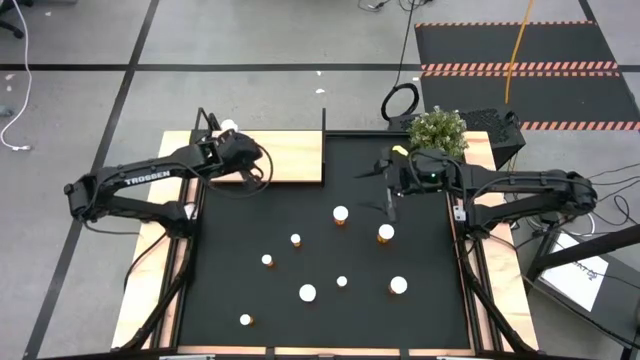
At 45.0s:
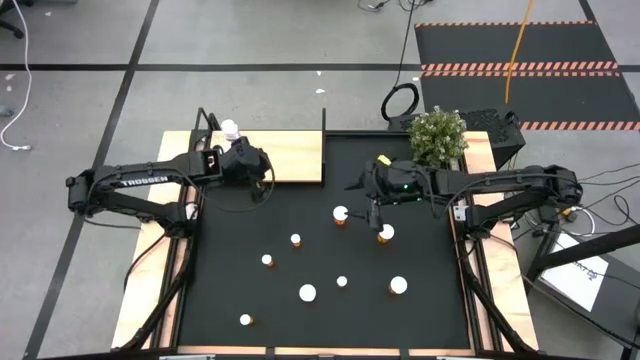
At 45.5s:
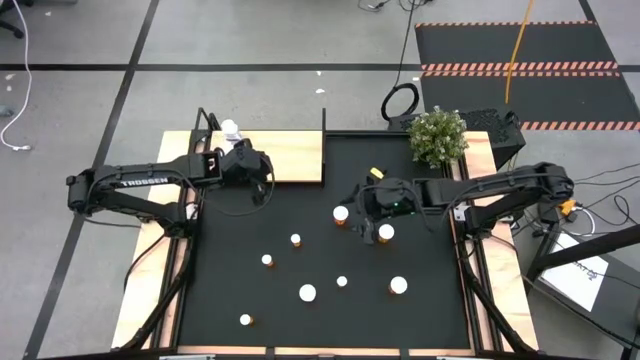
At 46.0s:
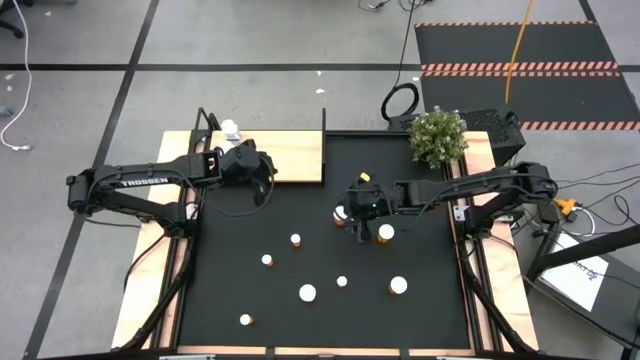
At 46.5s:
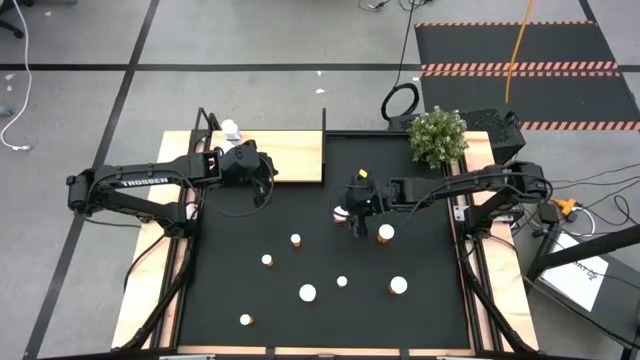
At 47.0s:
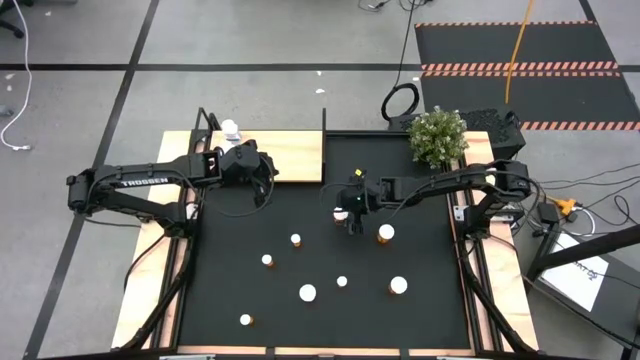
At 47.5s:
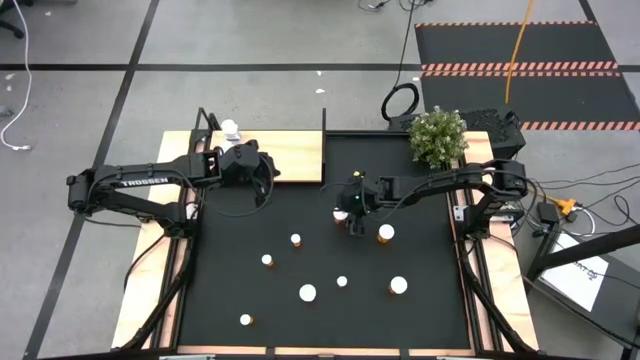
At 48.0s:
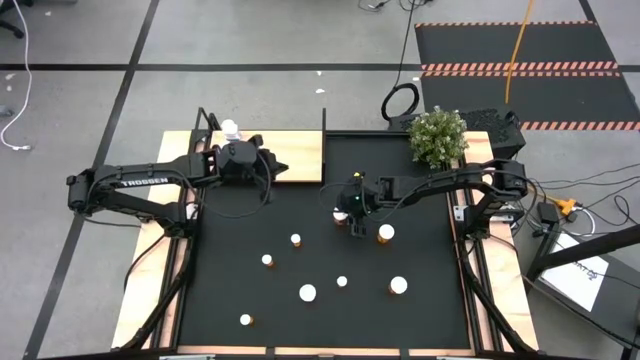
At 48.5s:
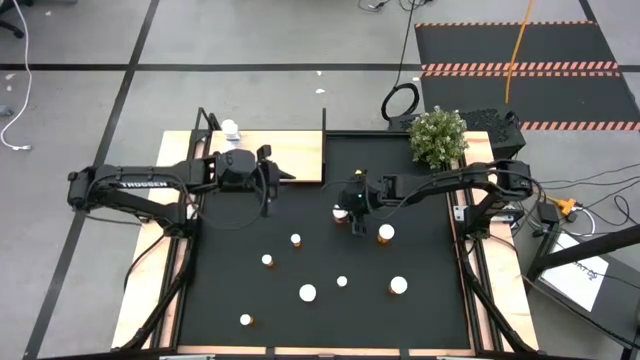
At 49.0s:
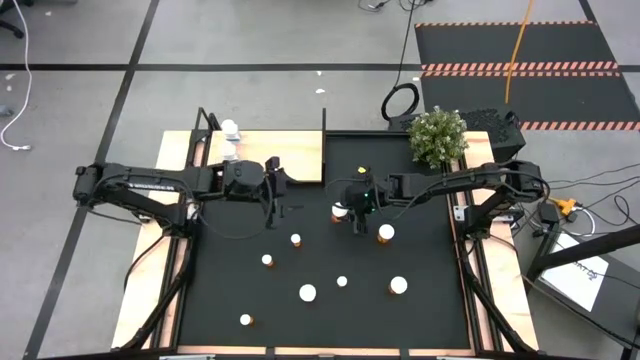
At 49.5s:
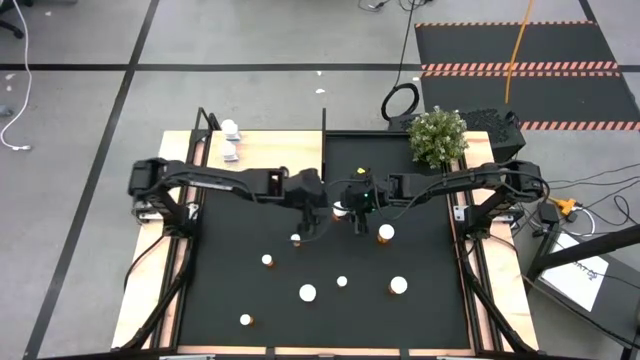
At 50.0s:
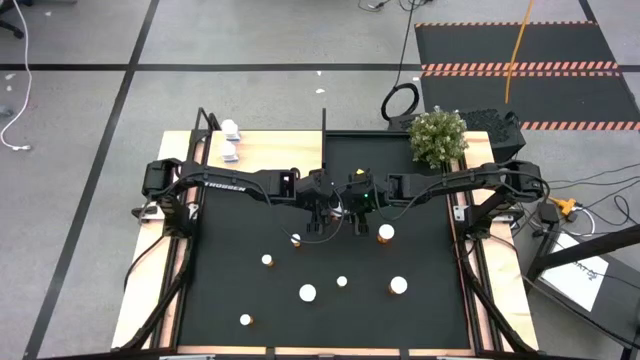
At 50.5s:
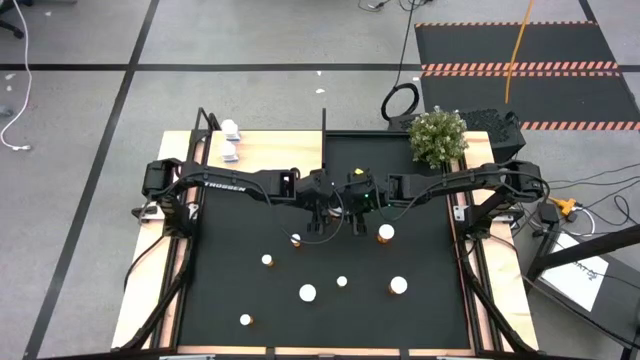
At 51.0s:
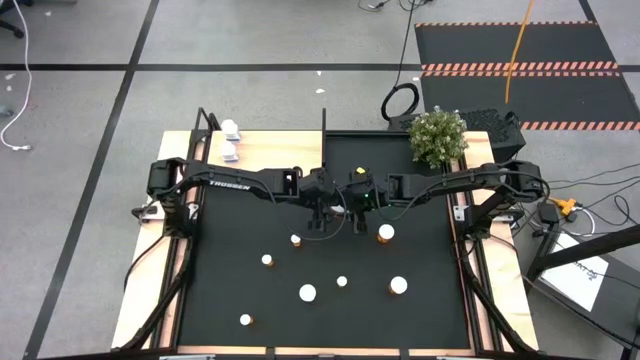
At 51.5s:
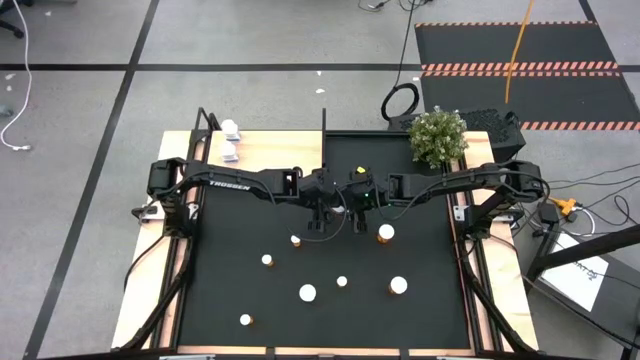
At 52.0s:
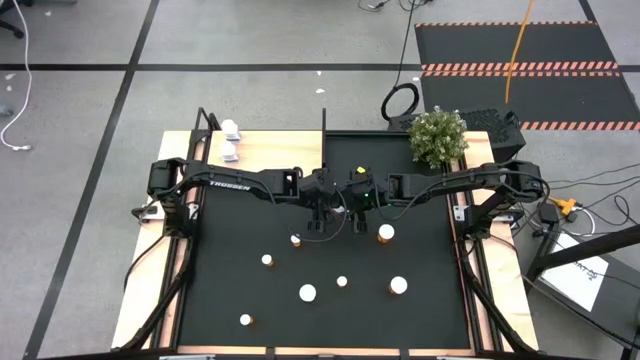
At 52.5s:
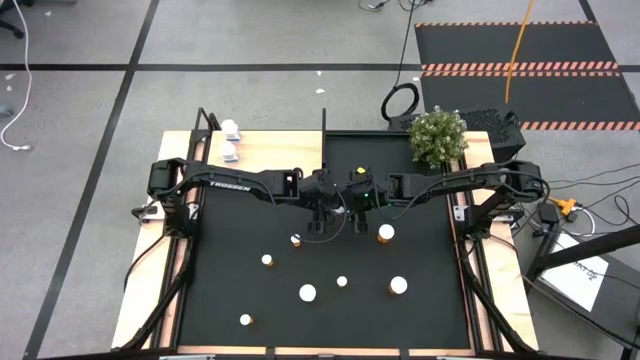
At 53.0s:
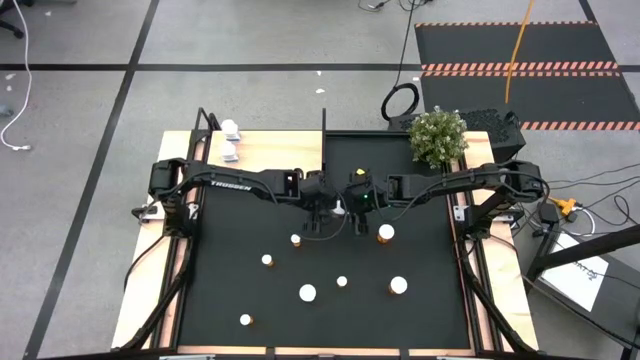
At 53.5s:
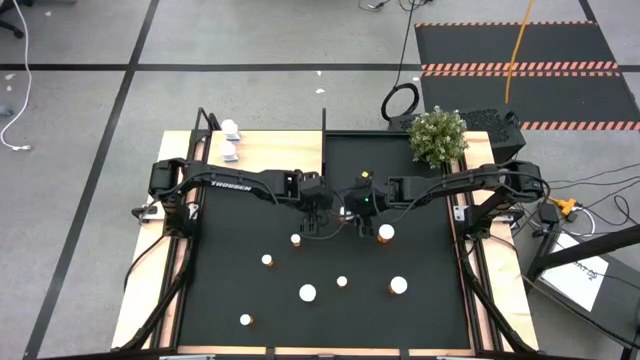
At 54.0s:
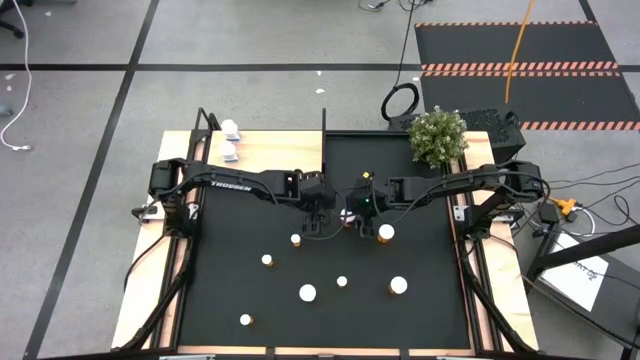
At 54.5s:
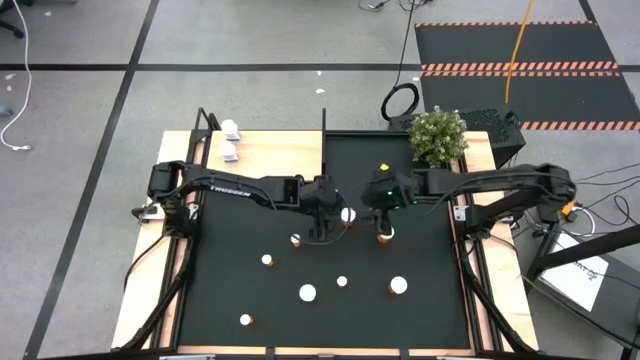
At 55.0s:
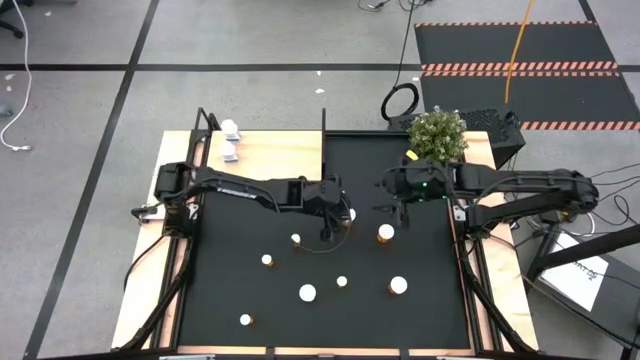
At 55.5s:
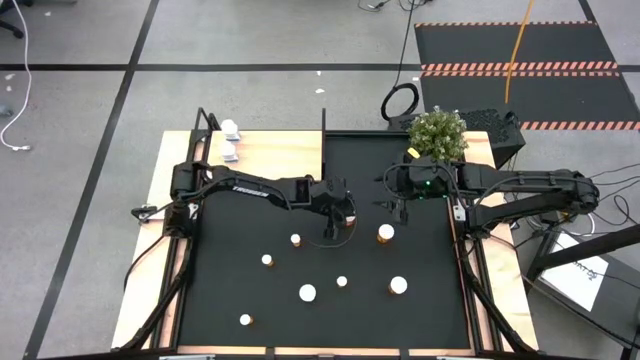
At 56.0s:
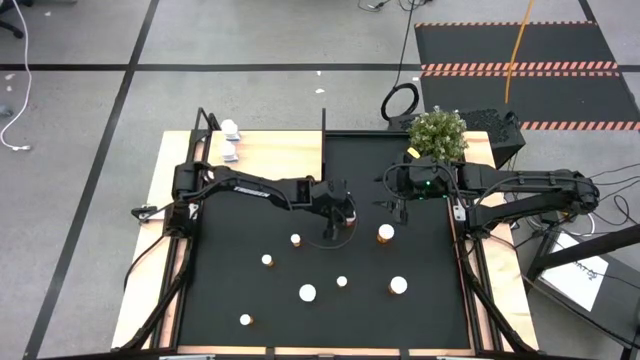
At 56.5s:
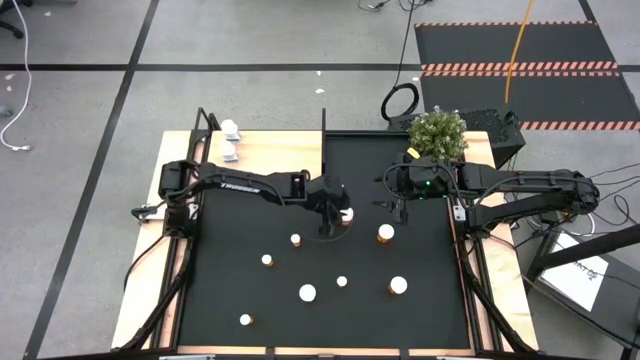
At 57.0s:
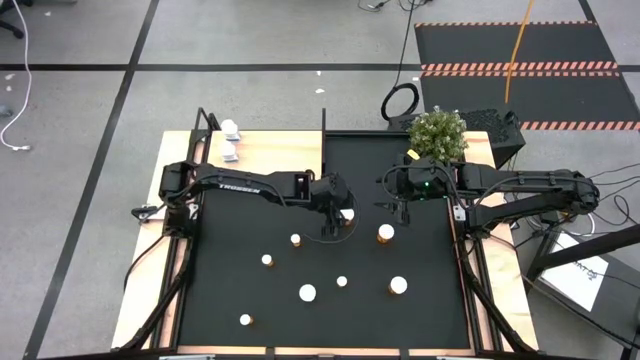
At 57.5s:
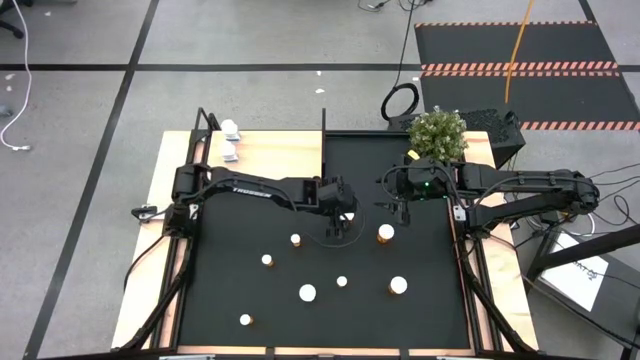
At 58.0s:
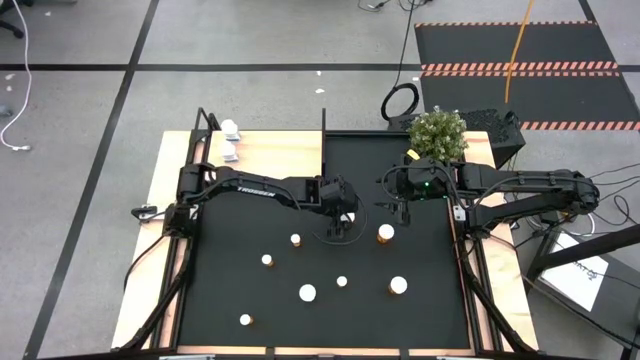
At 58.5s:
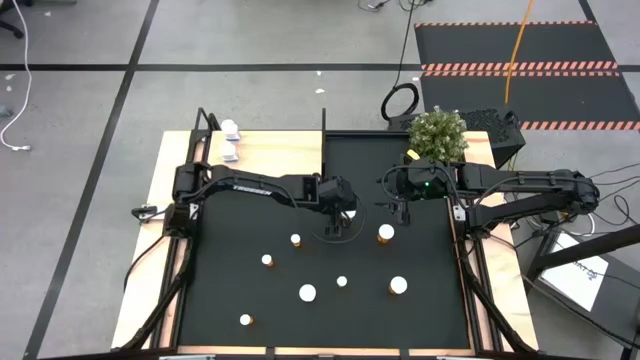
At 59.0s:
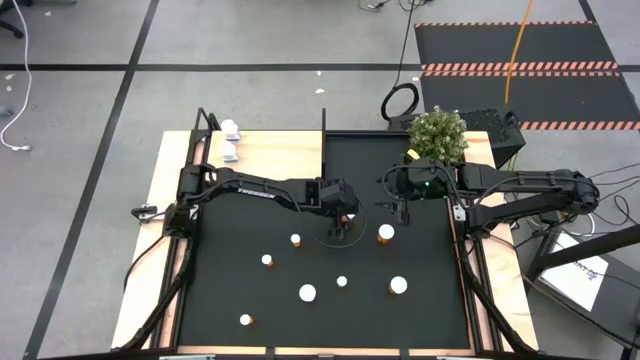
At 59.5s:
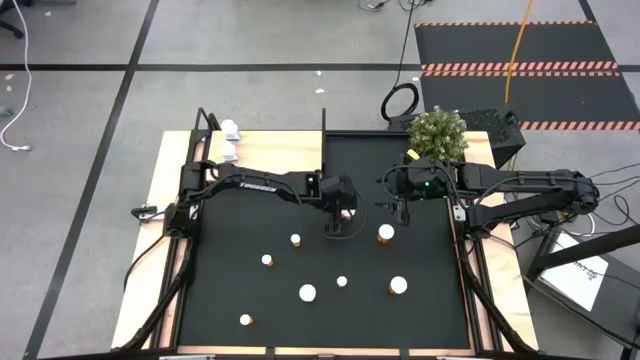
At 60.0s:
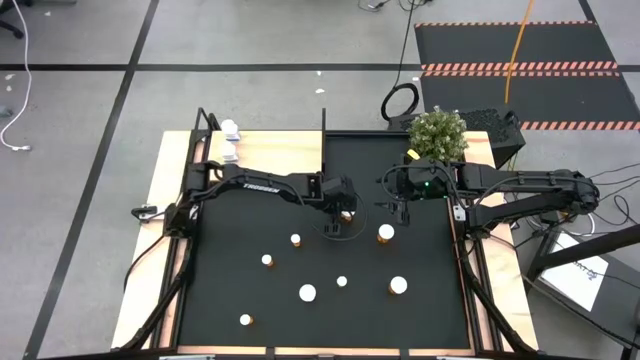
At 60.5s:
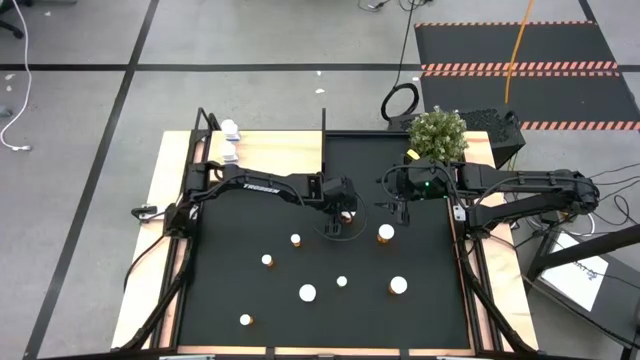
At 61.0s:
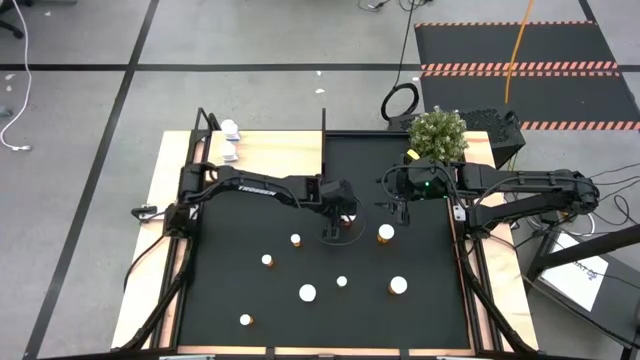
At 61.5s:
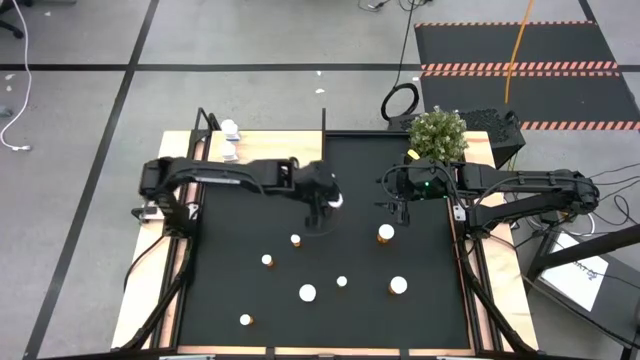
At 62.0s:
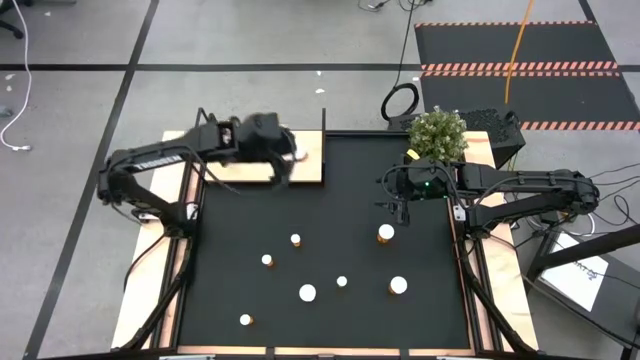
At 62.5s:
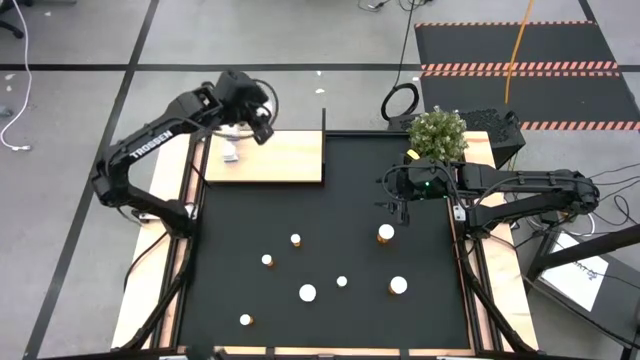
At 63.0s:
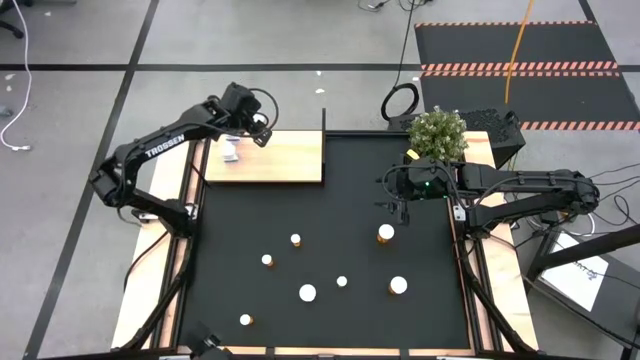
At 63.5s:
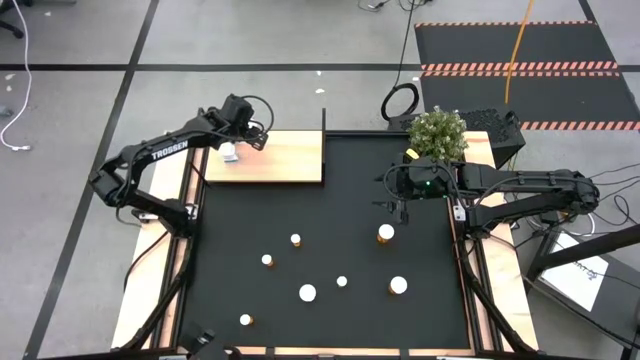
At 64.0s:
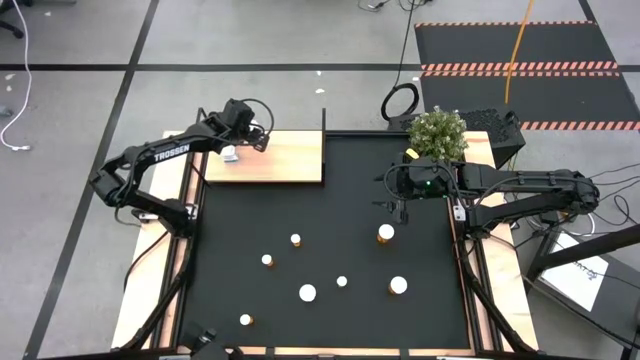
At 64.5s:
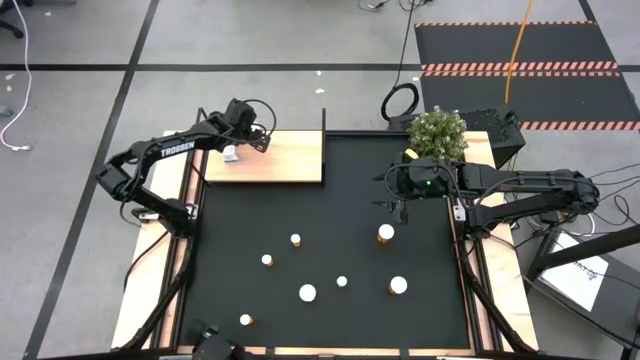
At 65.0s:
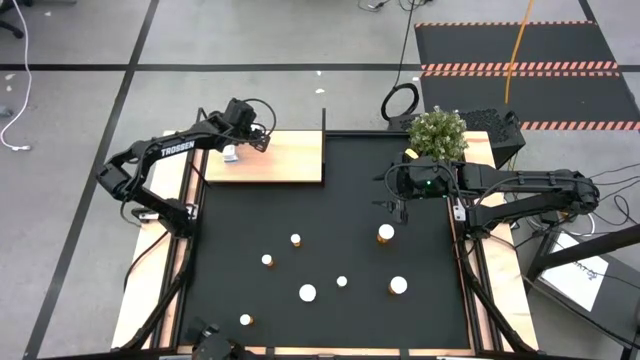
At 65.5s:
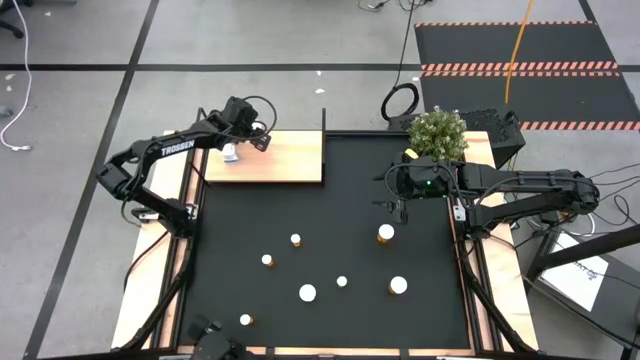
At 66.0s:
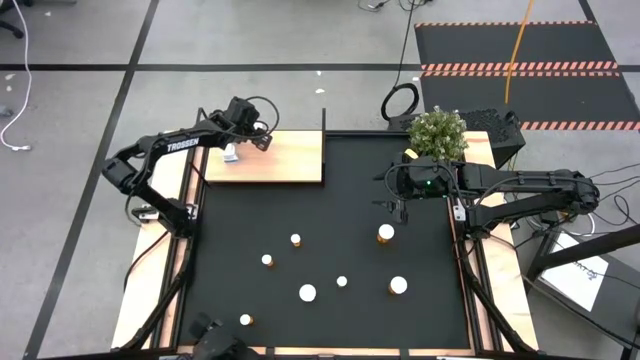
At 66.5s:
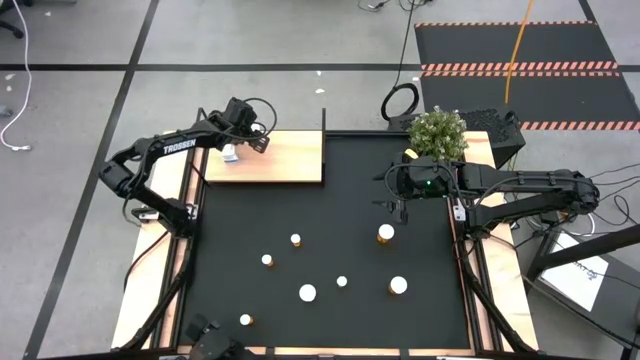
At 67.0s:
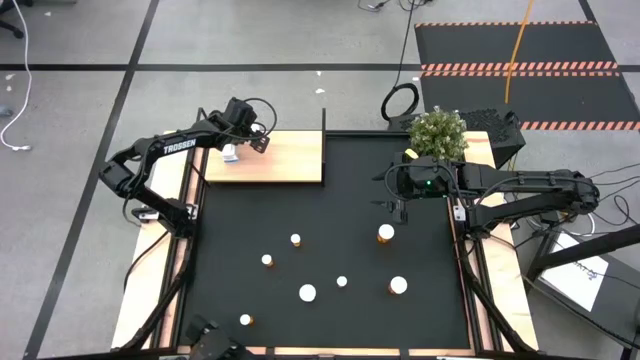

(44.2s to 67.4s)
Task: Pick and place medicine bottles onto shelf by color
Put the large orange pill bottle on the shelf
